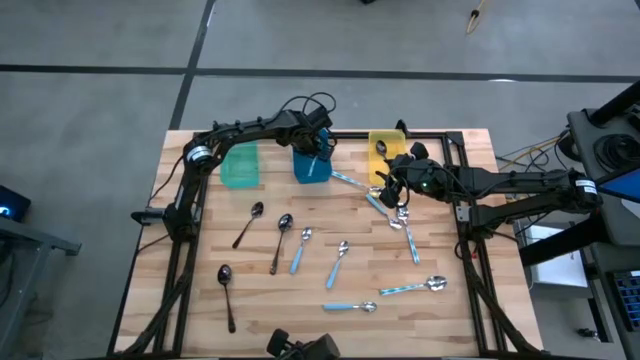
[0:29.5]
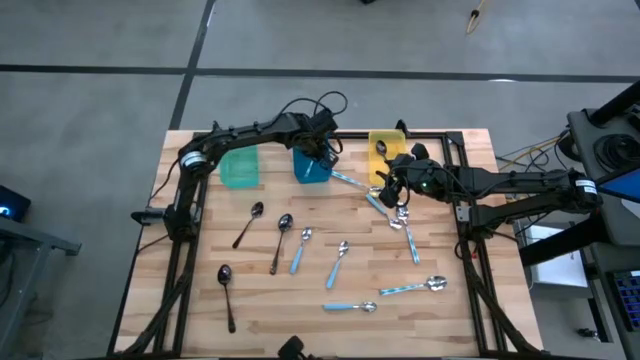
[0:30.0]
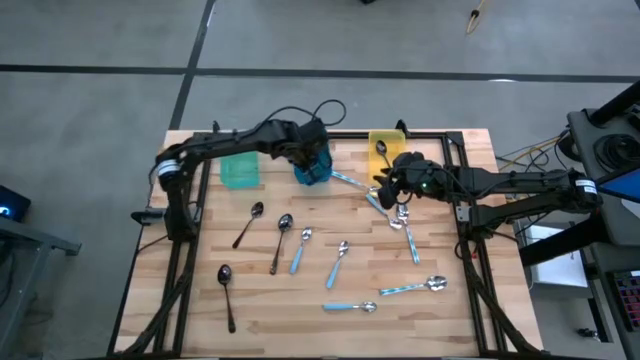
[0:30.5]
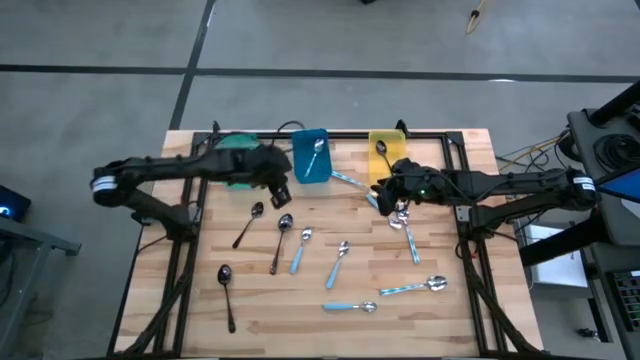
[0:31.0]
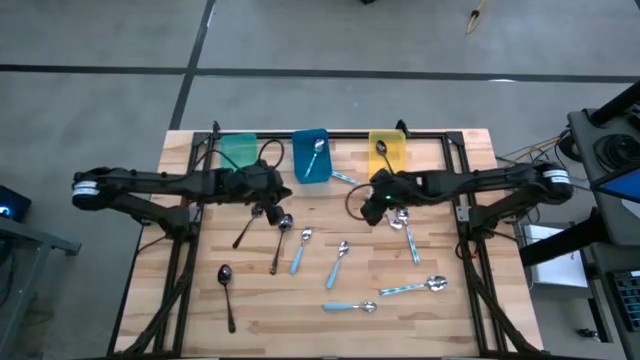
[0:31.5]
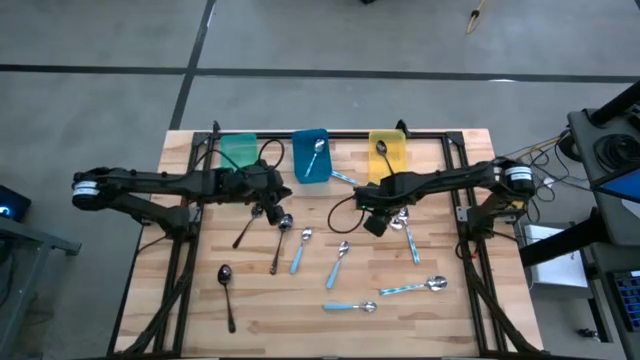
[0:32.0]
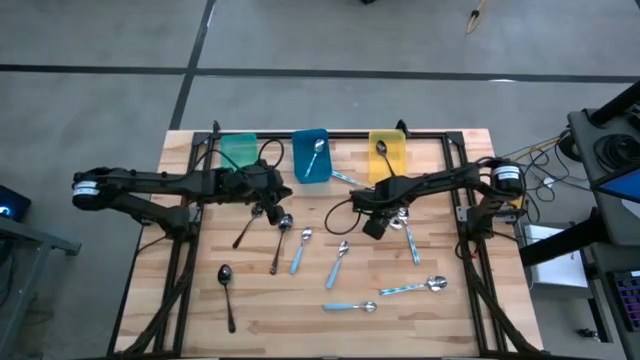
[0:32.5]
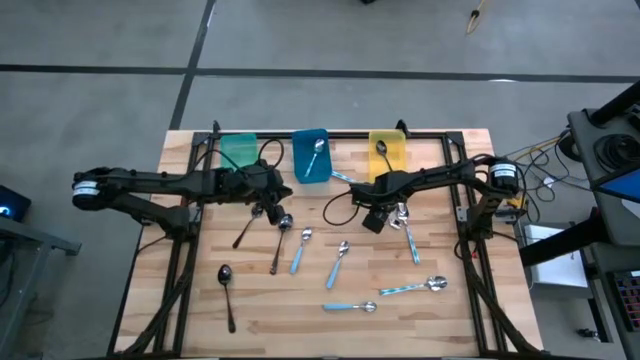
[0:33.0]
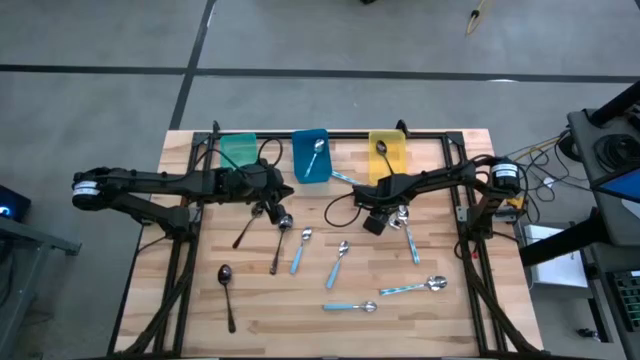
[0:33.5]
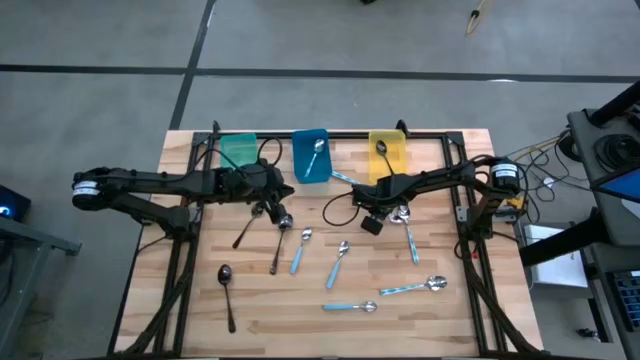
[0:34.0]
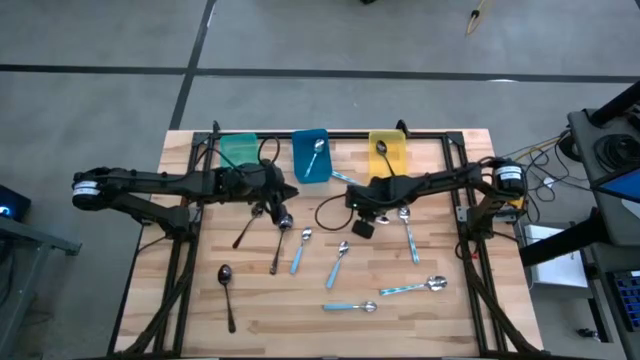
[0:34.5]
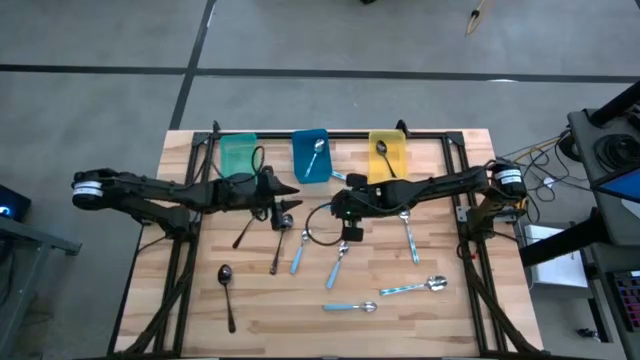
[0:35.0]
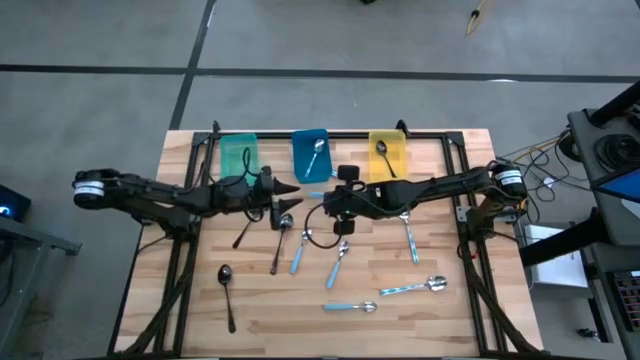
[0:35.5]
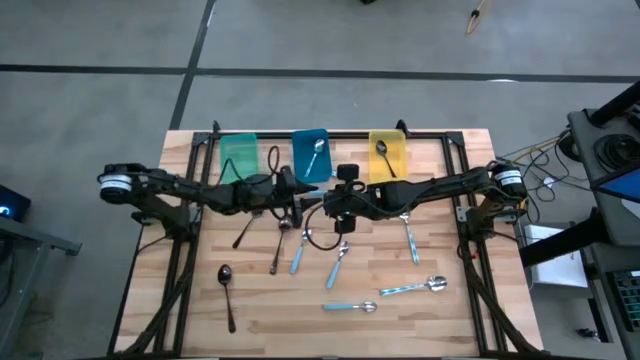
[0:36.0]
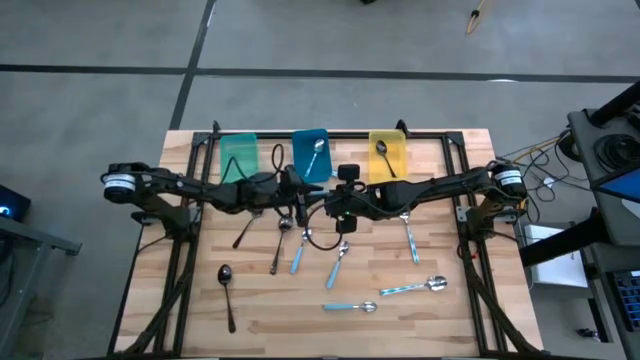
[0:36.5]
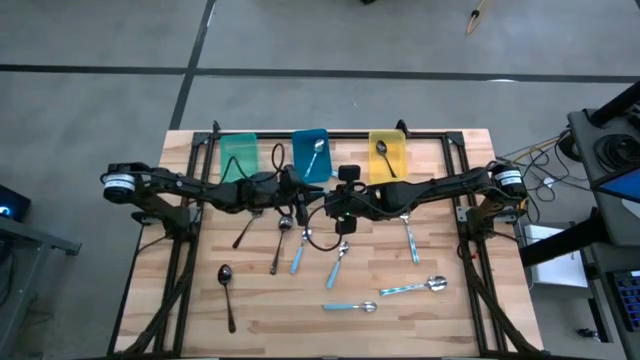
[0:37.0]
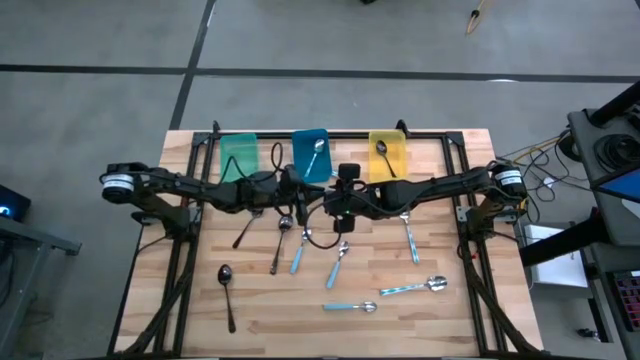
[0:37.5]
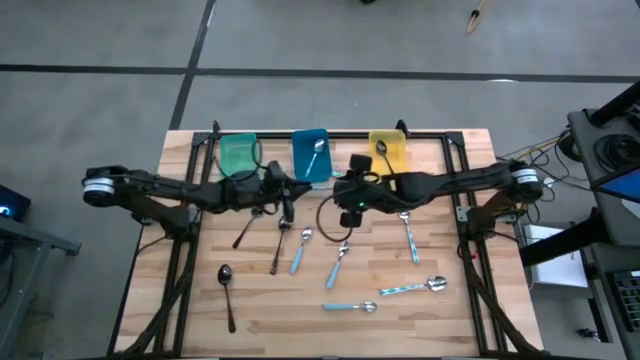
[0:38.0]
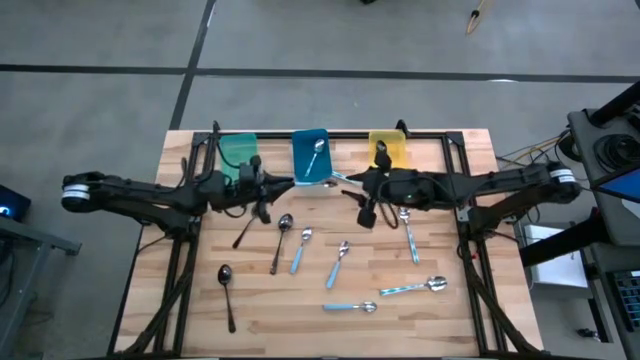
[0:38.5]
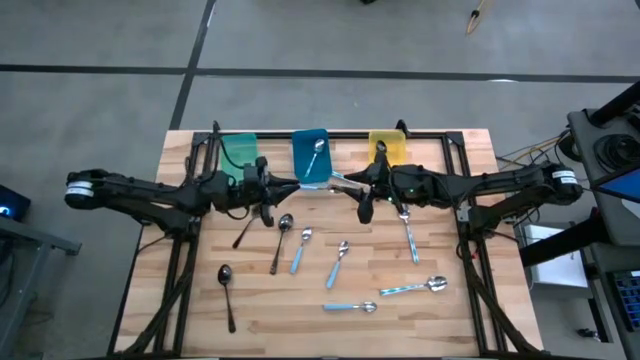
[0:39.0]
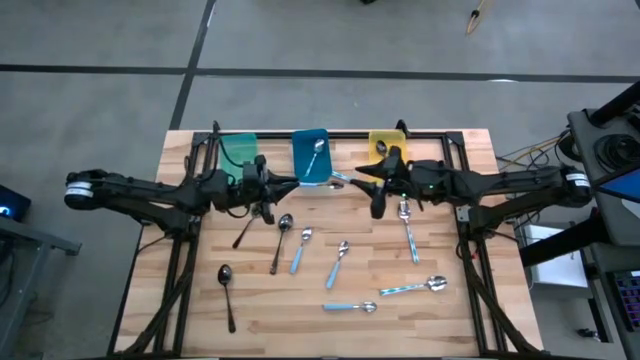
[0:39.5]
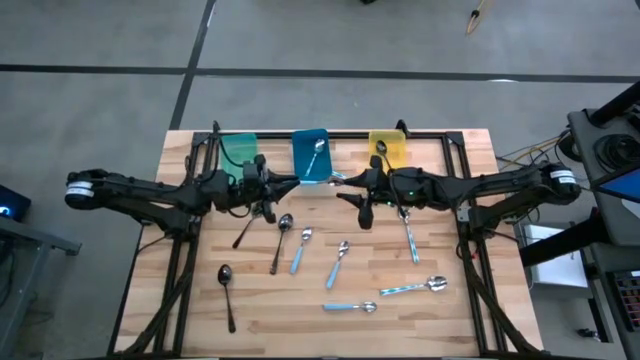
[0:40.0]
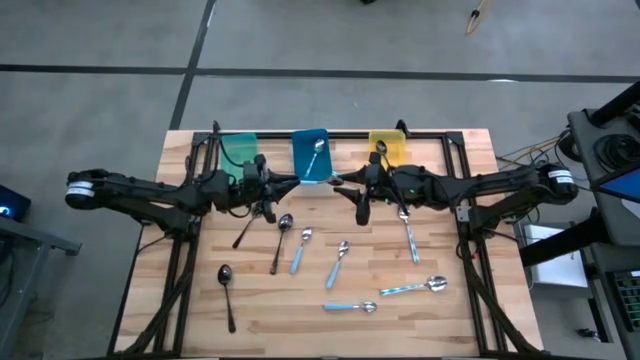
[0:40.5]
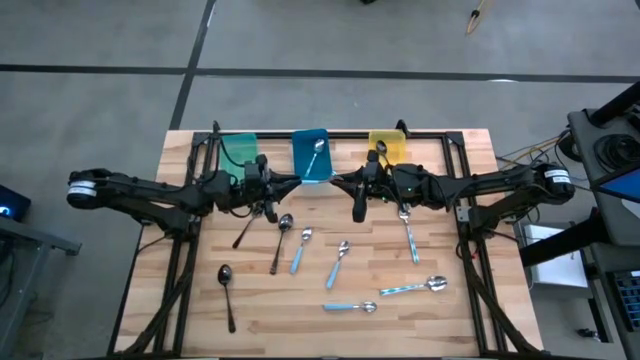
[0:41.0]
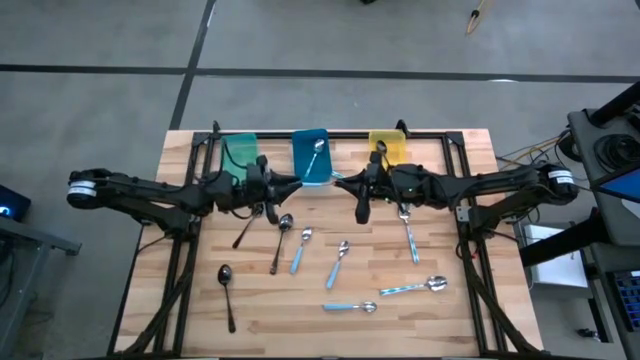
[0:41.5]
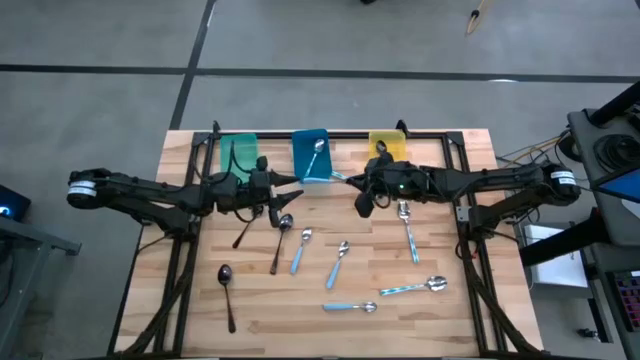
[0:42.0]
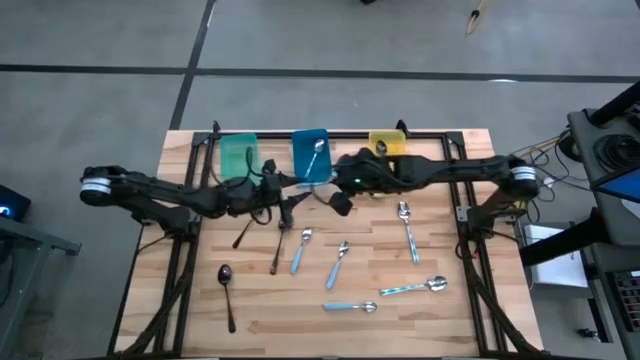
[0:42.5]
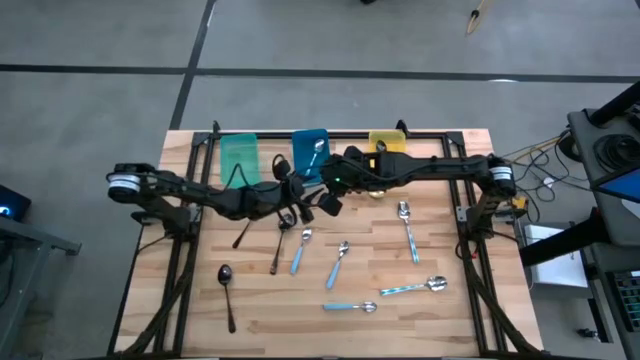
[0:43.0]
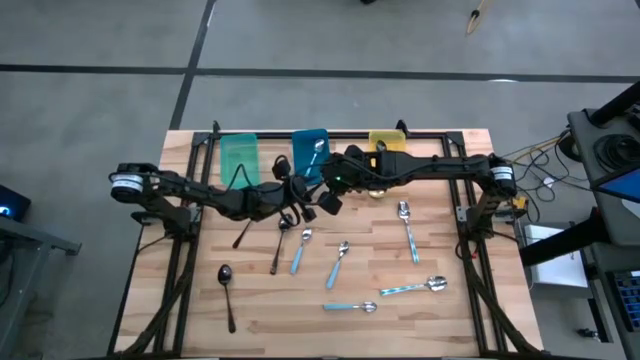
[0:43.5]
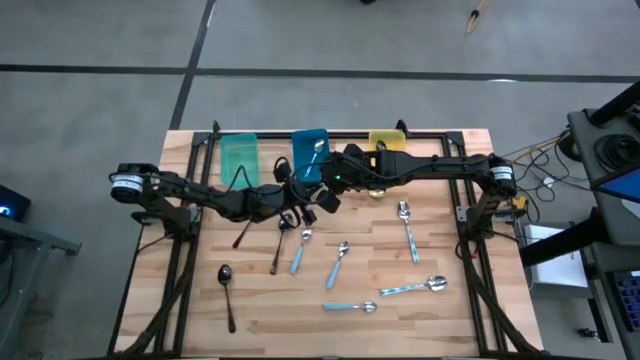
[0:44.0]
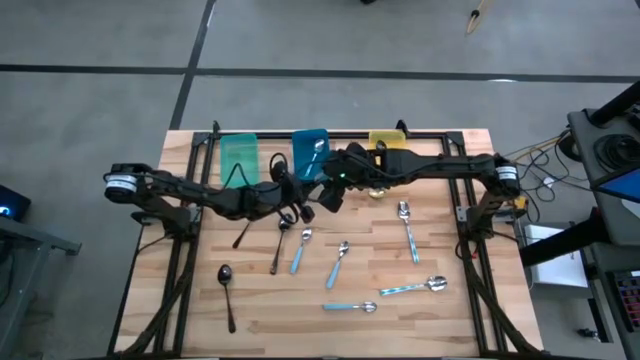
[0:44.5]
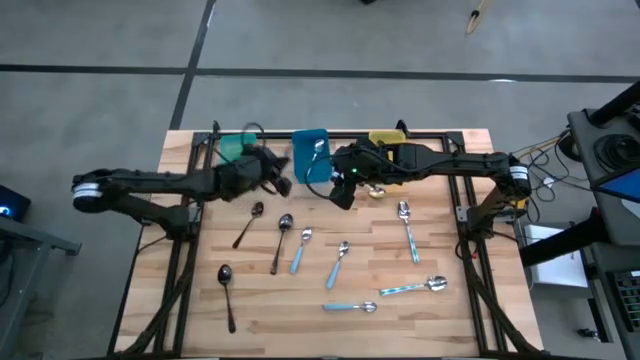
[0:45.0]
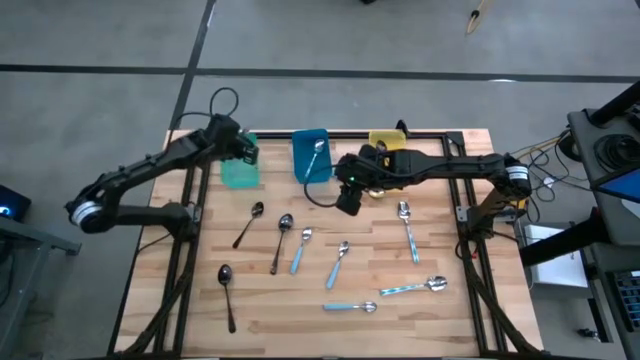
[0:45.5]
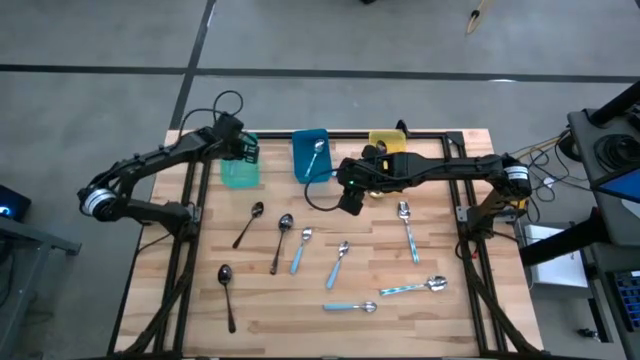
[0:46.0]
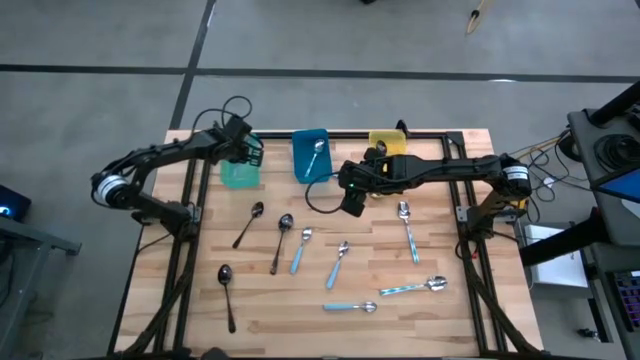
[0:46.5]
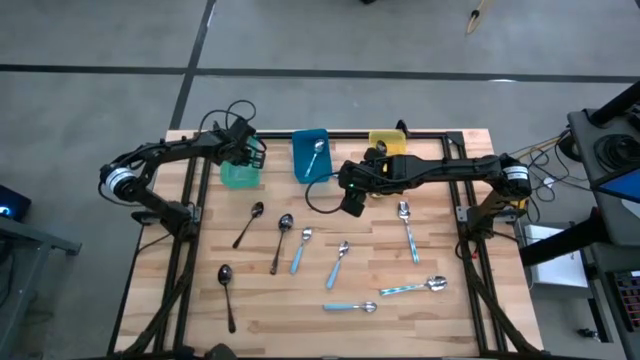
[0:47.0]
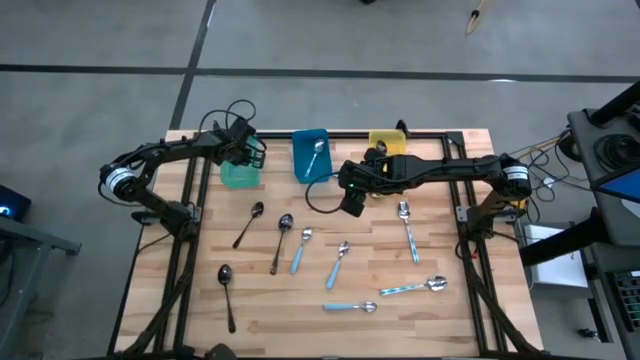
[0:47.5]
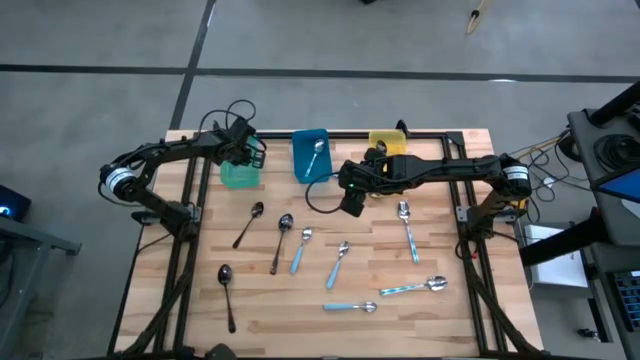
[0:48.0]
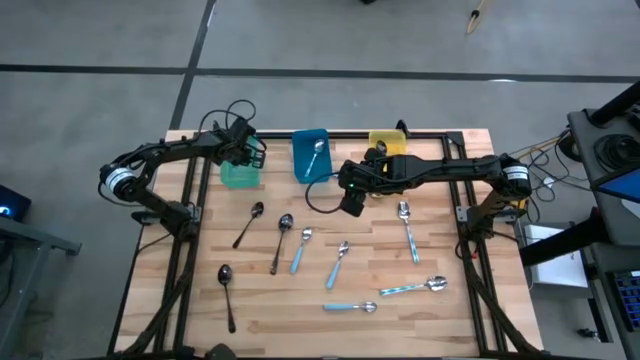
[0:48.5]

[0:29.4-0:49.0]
Task: Sort silverware by color (type)
Put the blue spoon into the green bin

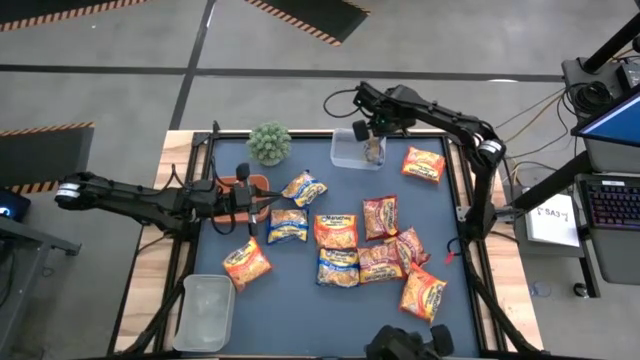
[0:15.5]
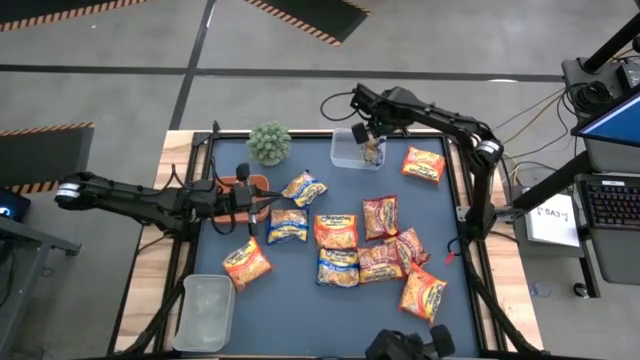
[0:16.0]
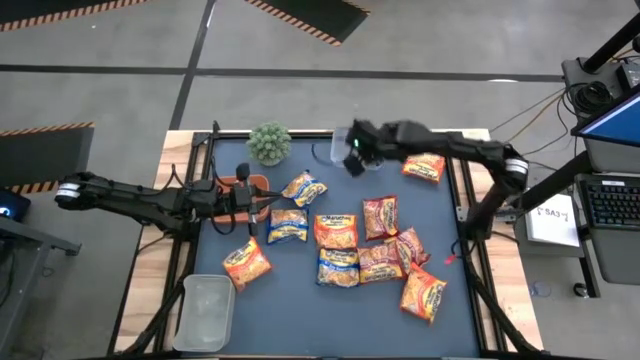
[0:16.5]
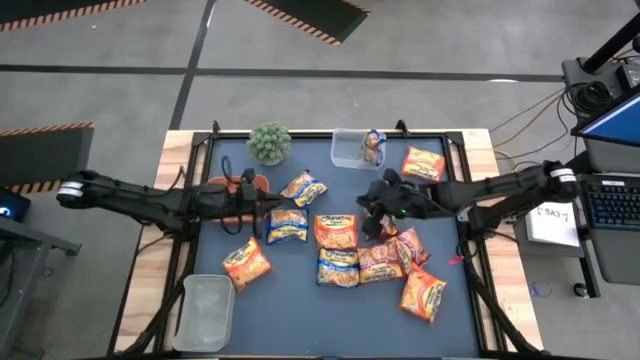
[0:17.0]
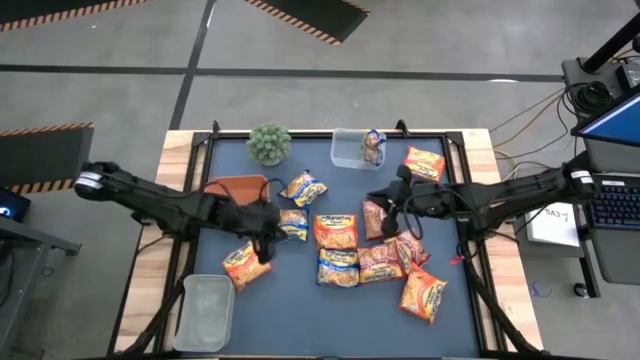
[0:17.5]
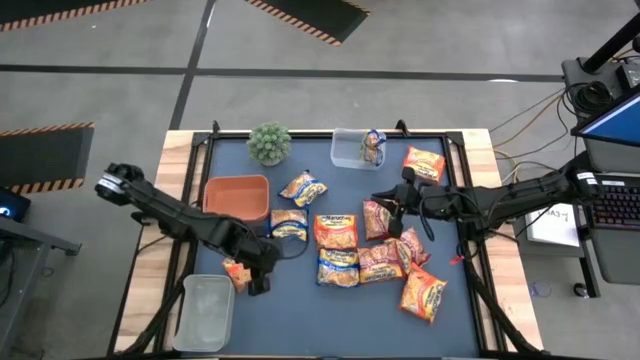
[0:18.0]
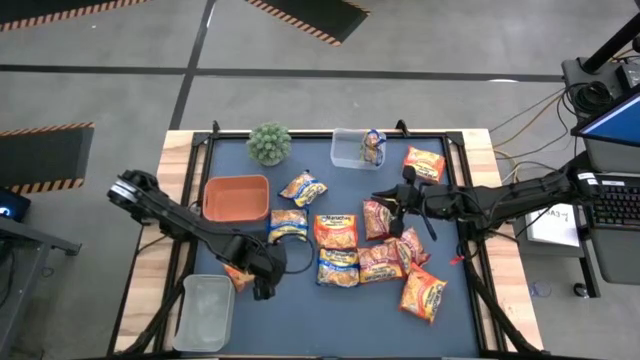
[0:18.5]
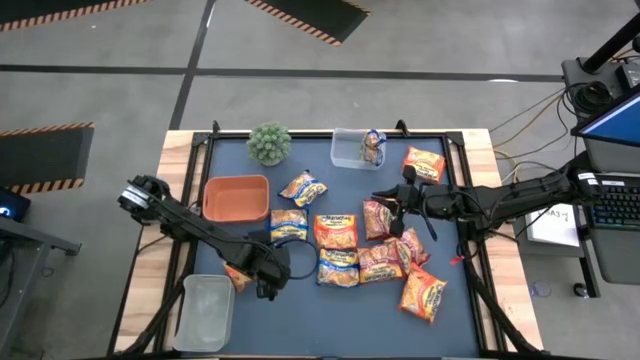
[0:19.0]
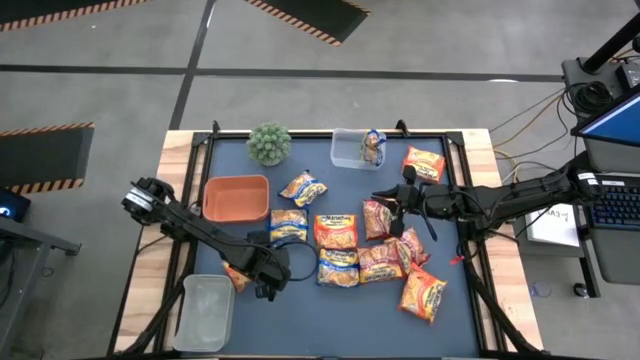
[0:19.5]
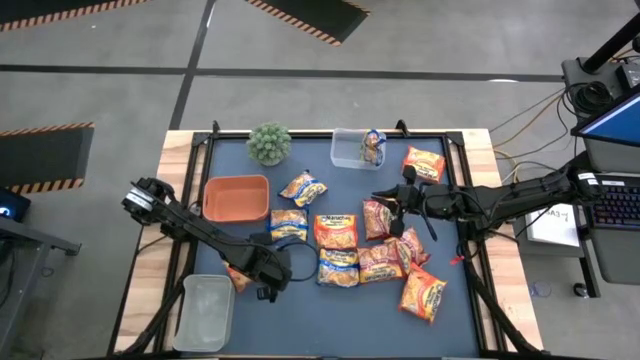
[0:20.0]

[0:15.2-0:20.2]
Task: Sort Maruchan noodles
Put the orange noodle pack into the orange bin
